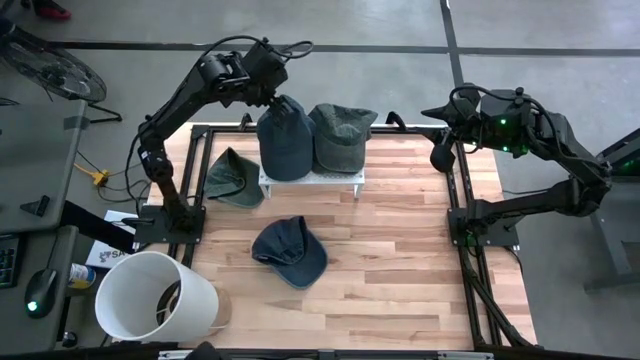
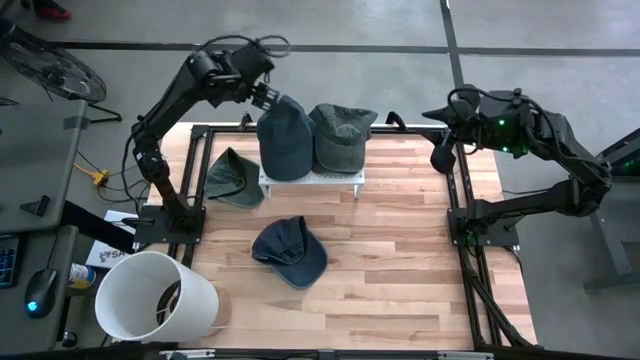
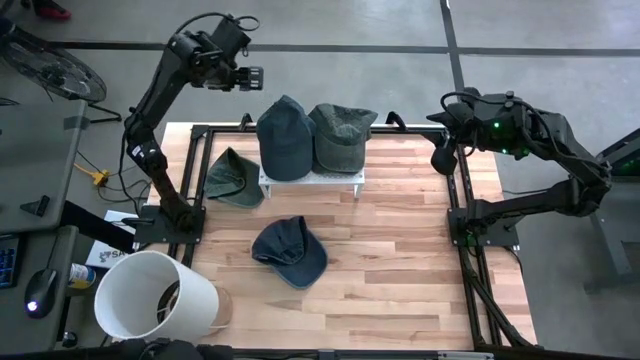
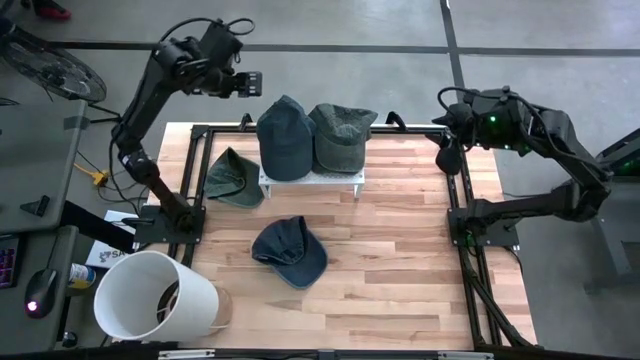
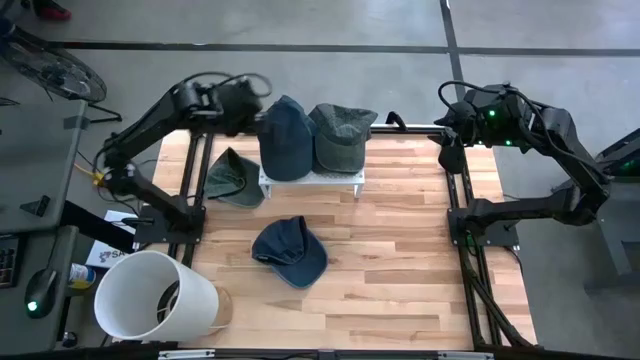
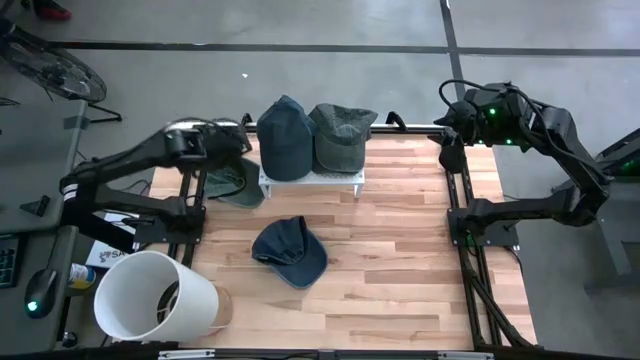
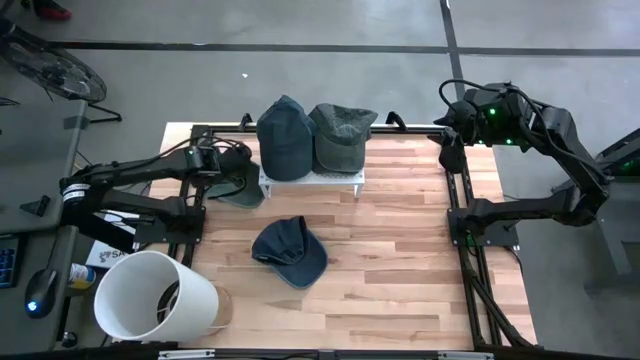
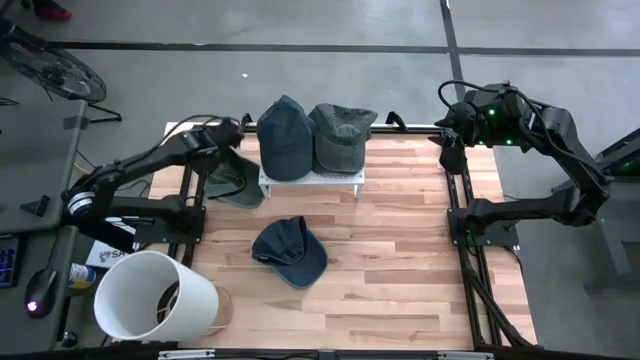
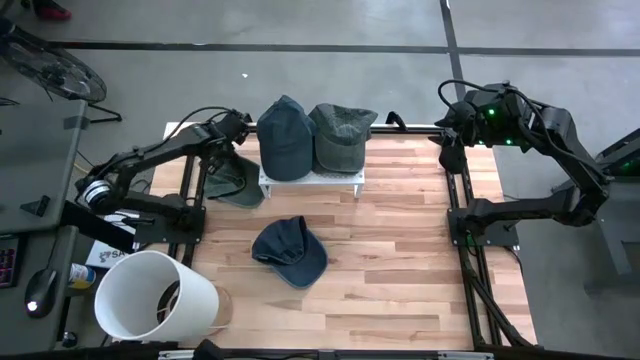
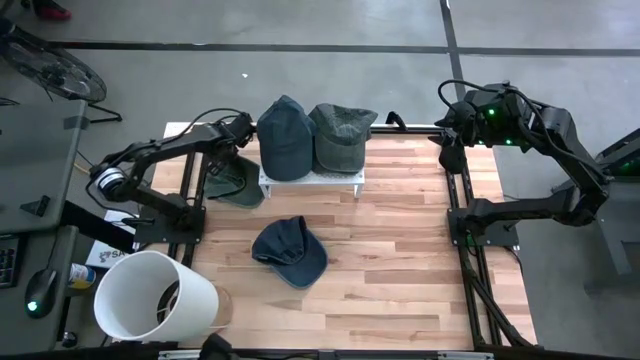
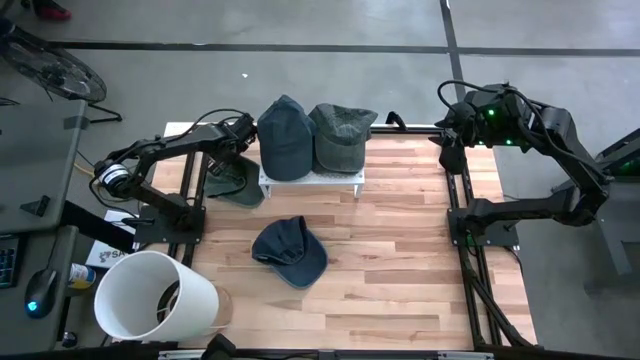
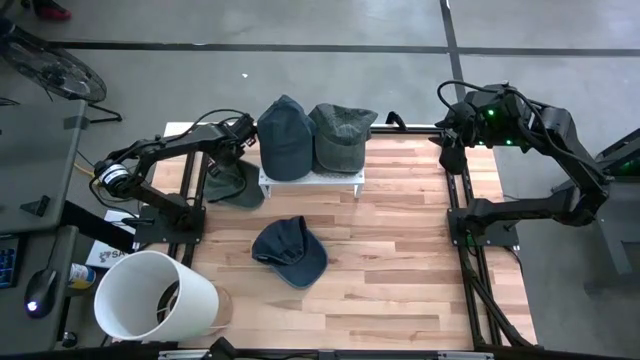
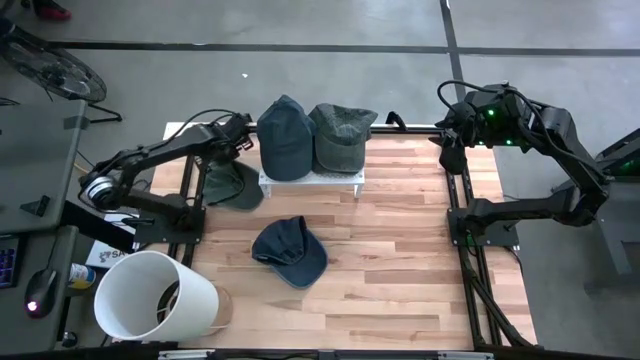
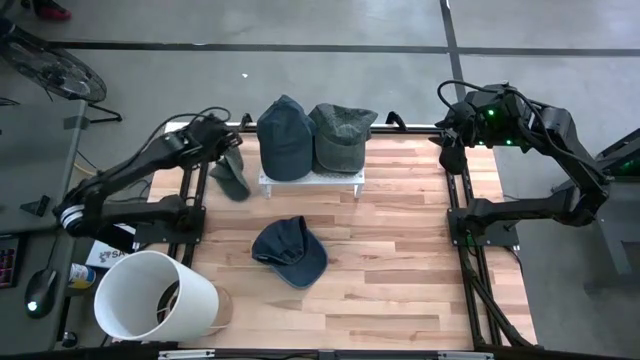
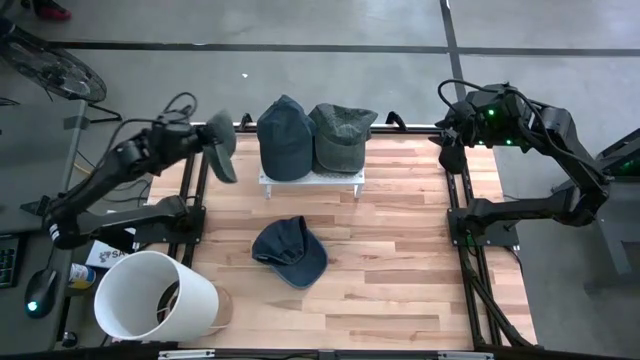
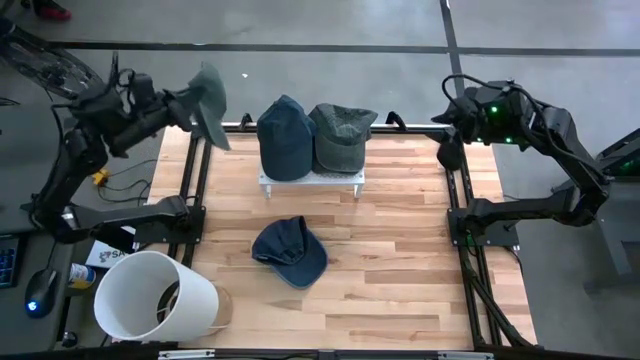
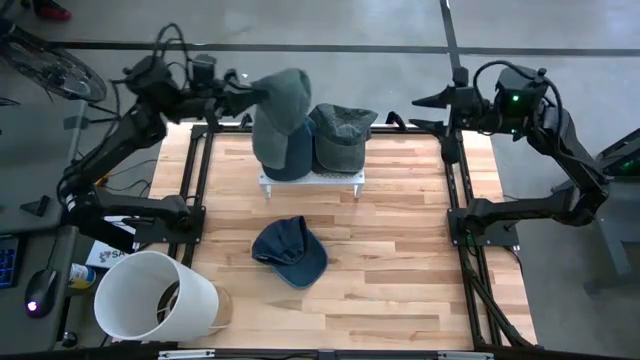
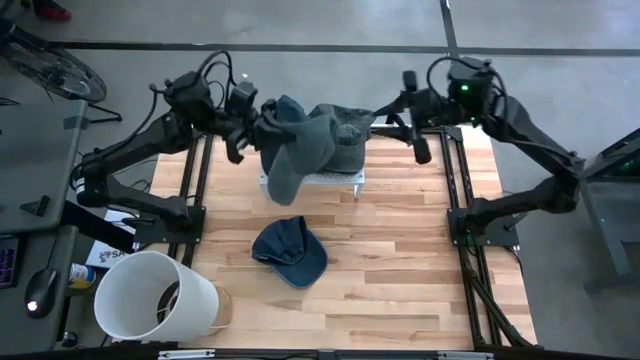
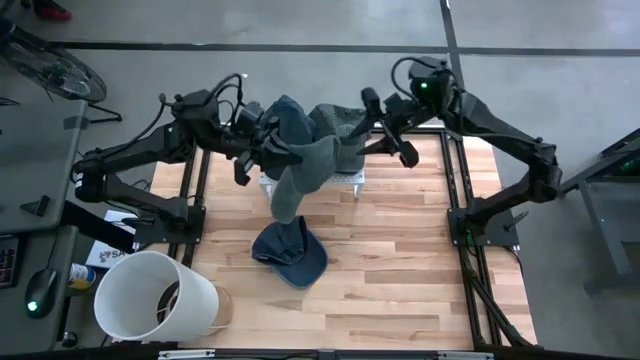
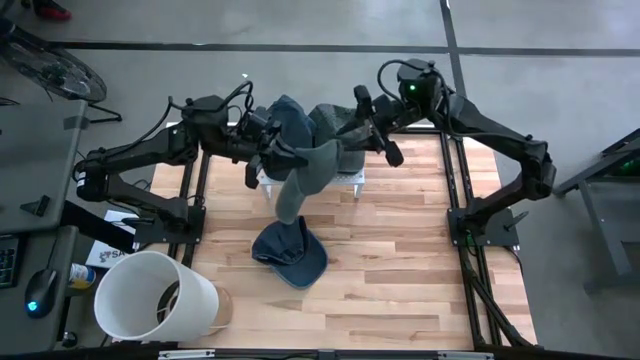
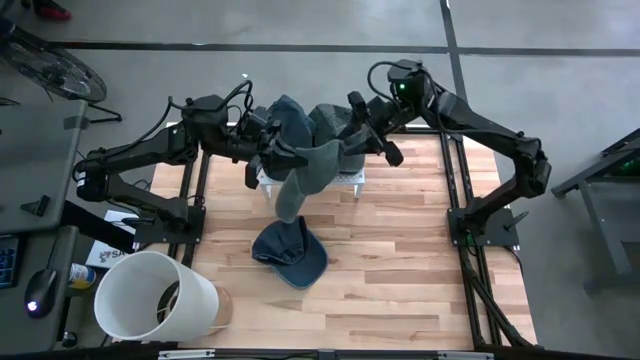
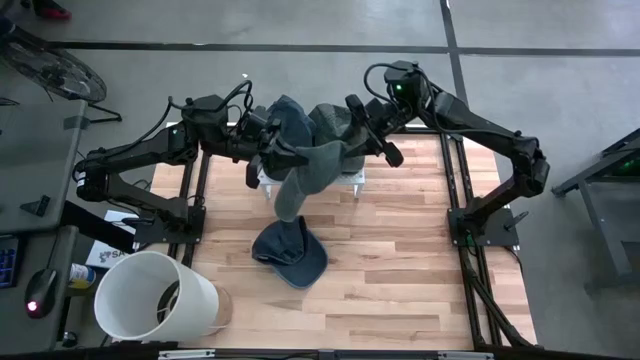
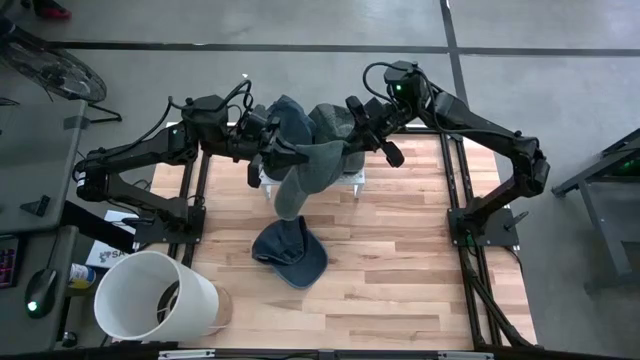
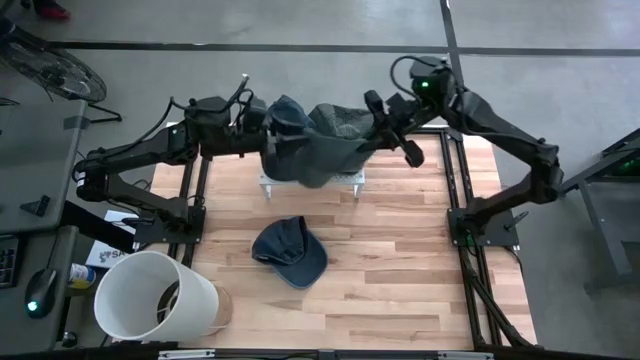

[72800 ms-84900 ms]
Task: Pick & Place hat
Stack the gray cap on top of the other gray cap on the shelf

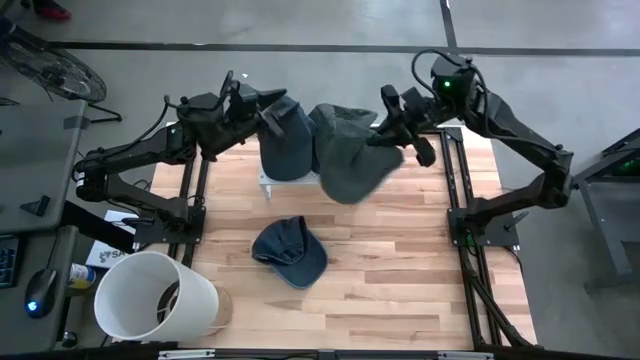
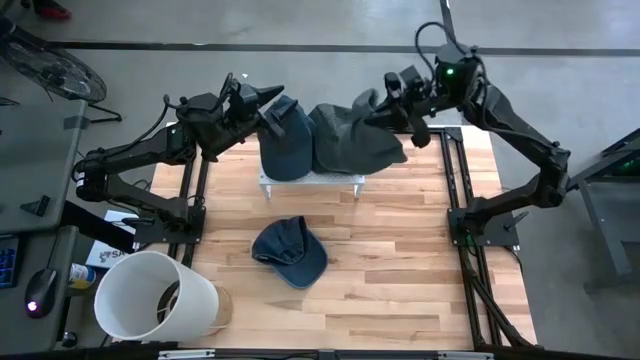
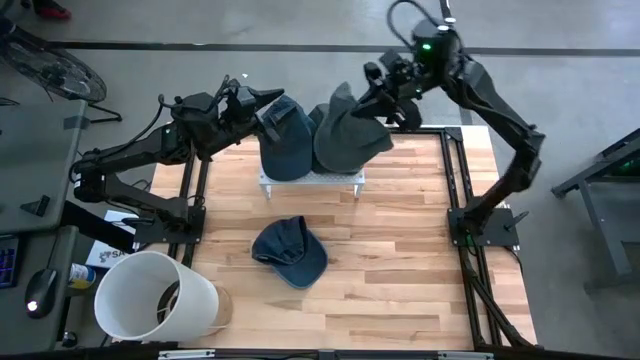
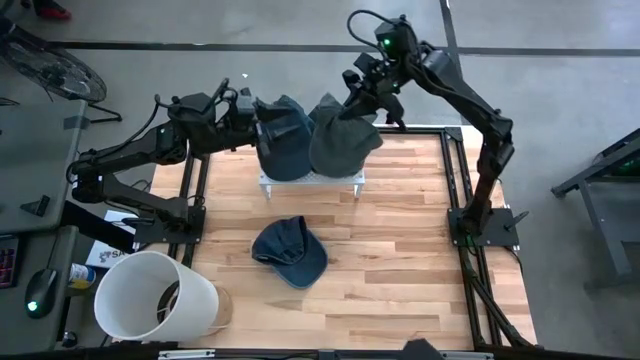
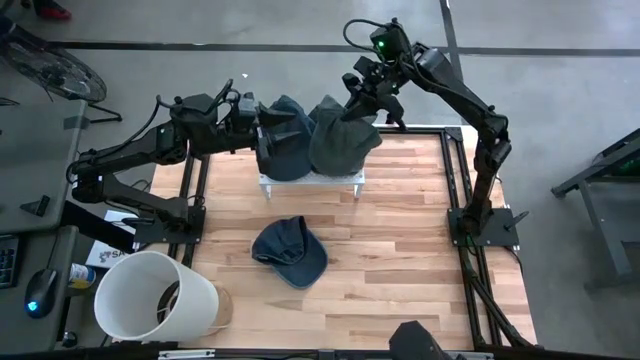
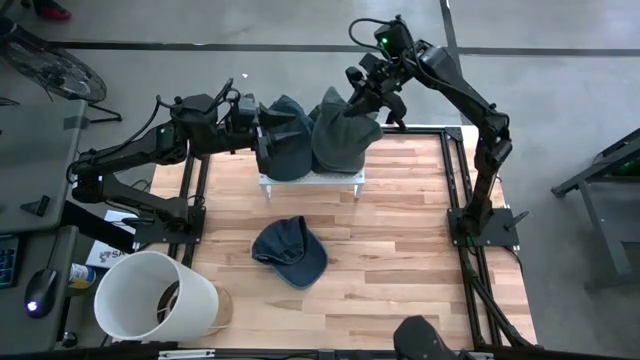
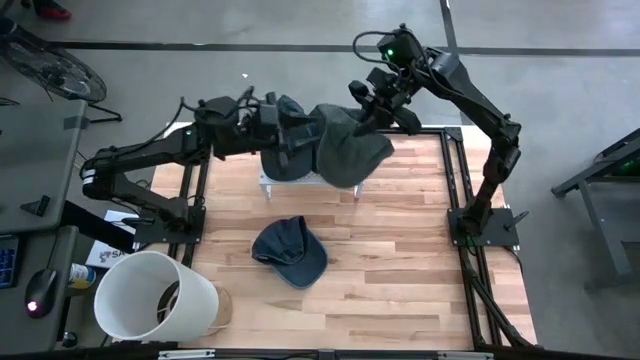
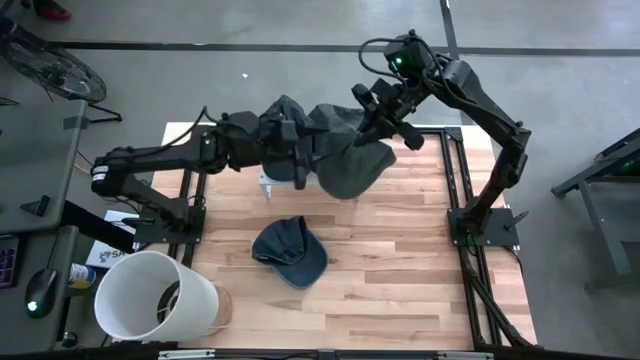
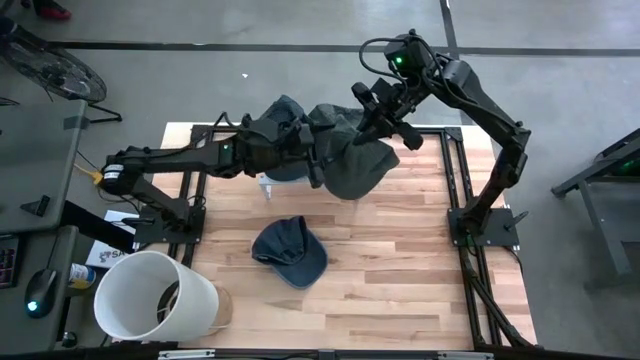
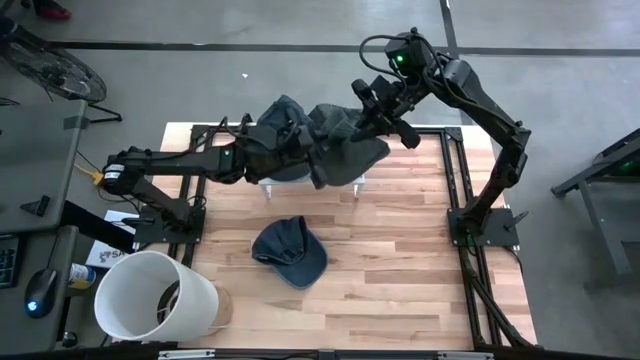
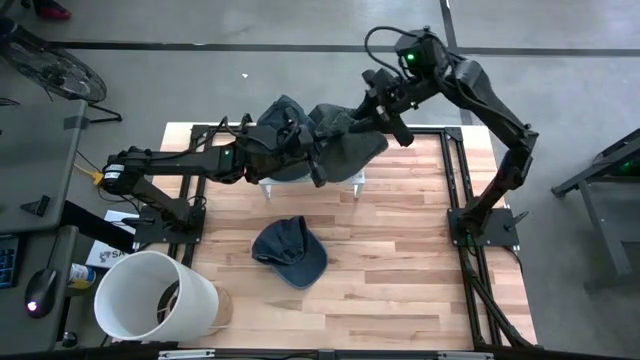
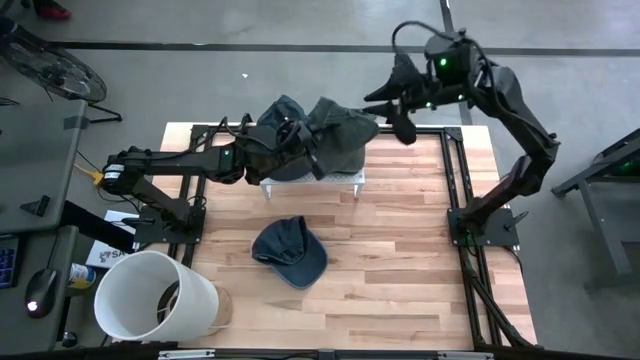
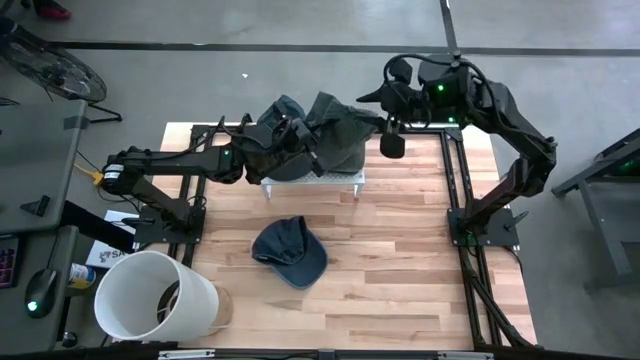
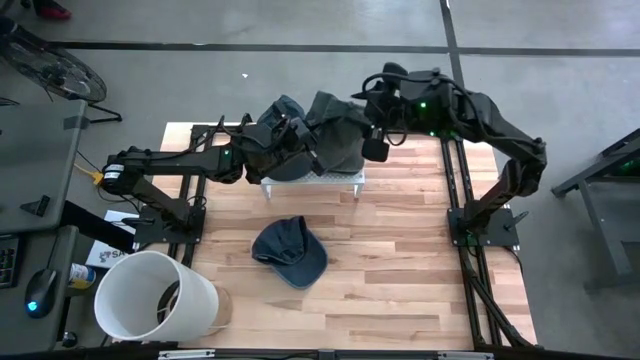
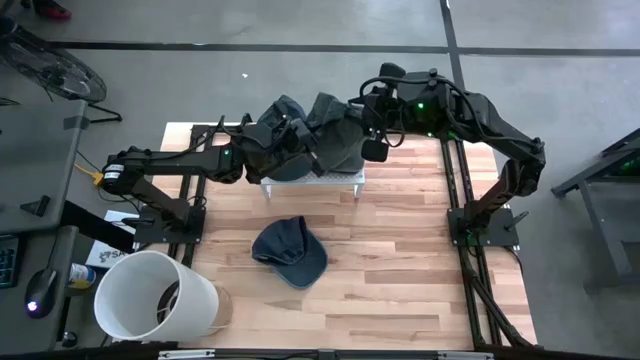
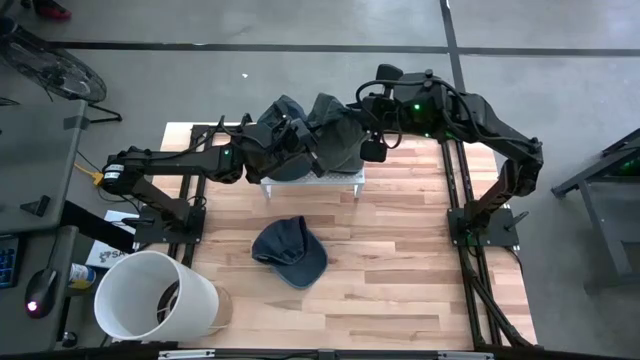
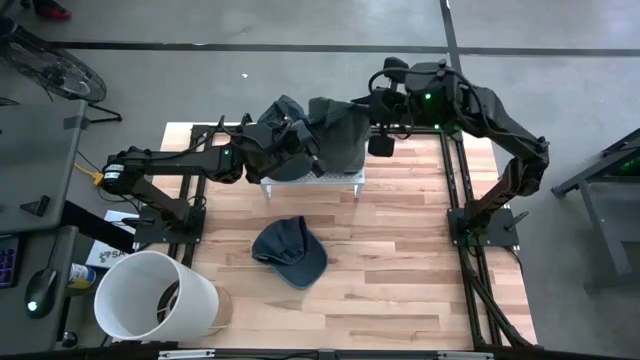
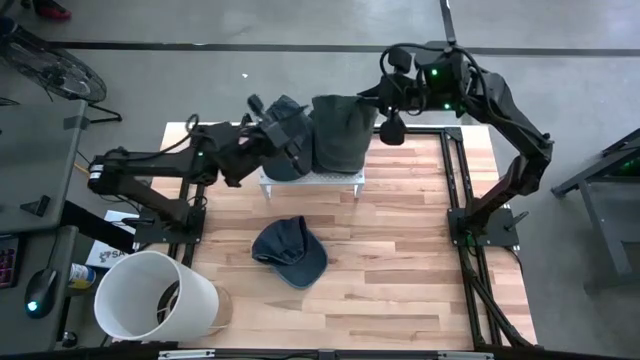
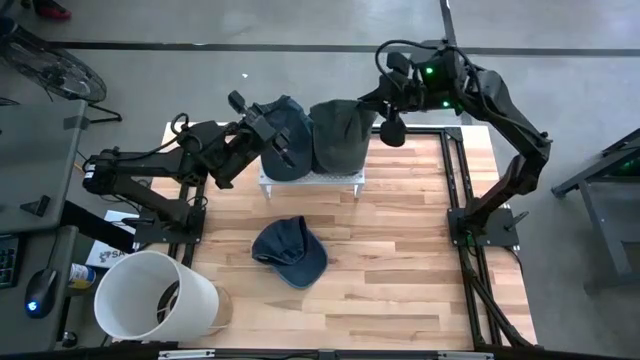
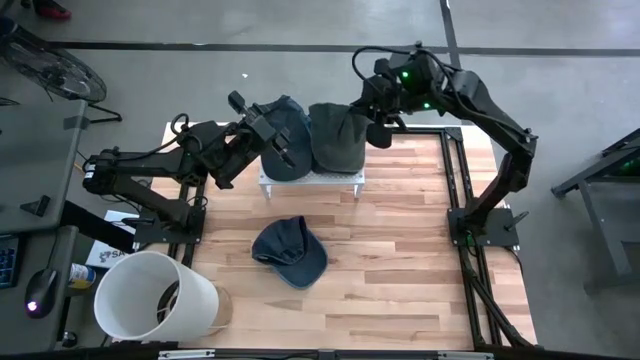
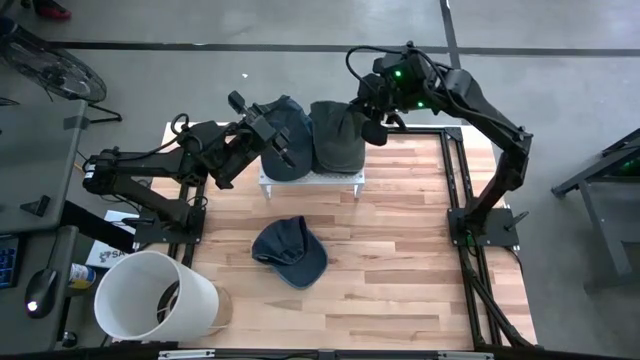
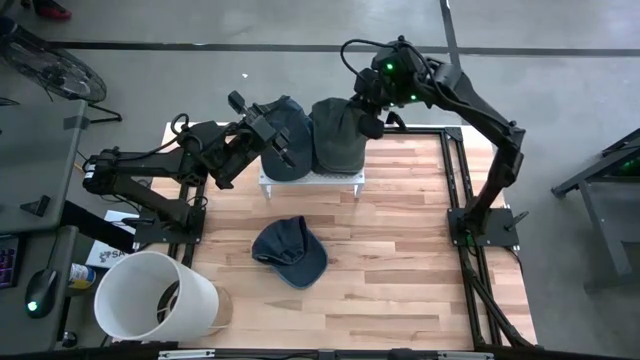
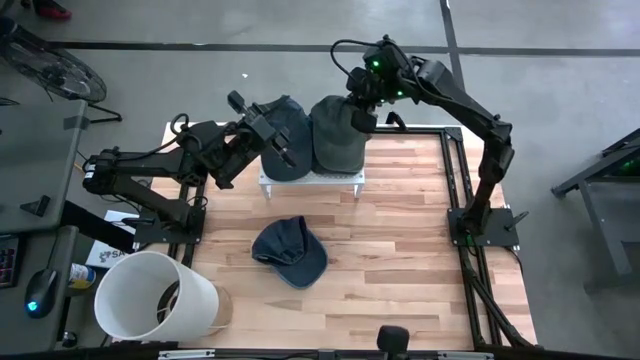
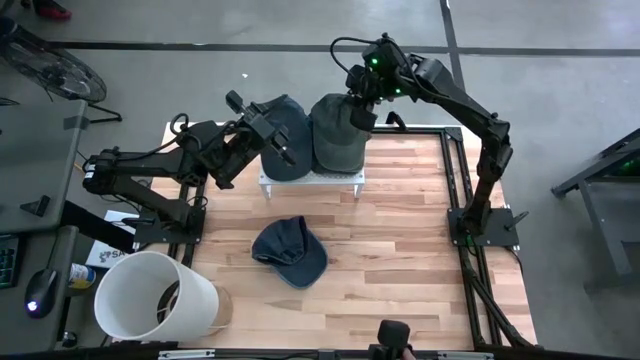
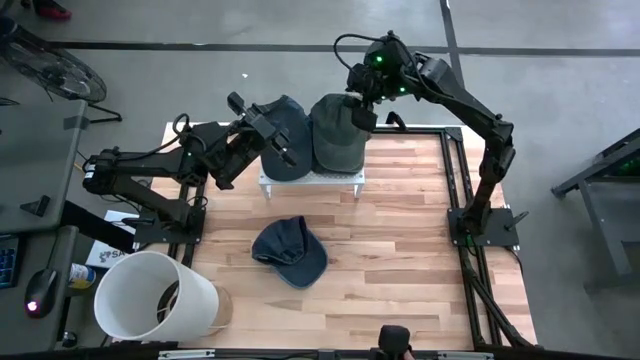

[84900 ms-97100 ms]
Stack the gray cap on top of the other gray cap on the shelf
